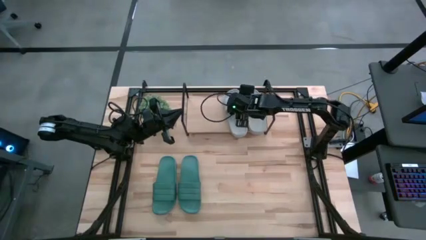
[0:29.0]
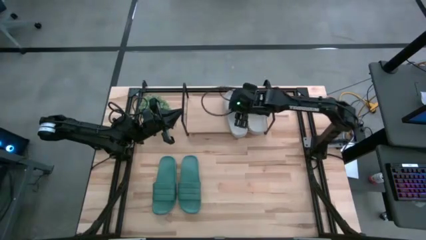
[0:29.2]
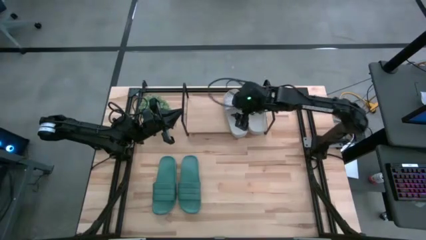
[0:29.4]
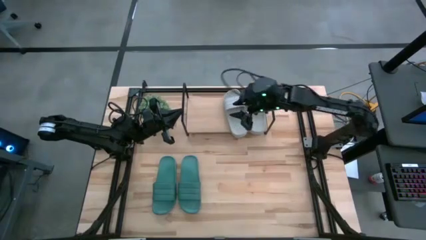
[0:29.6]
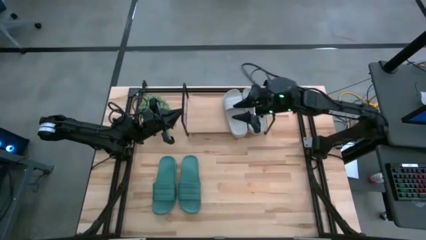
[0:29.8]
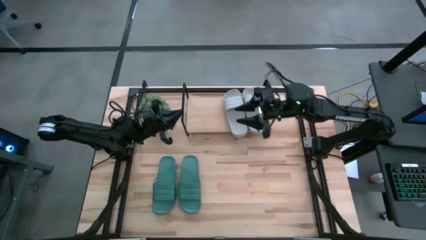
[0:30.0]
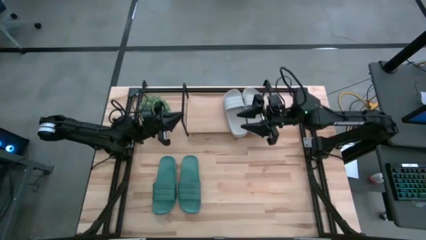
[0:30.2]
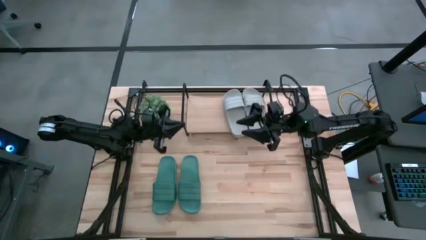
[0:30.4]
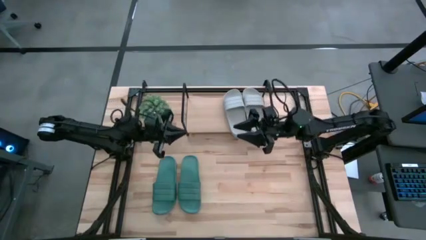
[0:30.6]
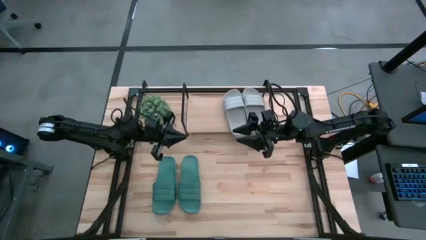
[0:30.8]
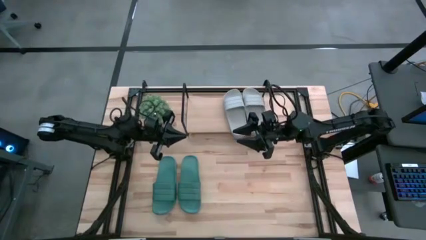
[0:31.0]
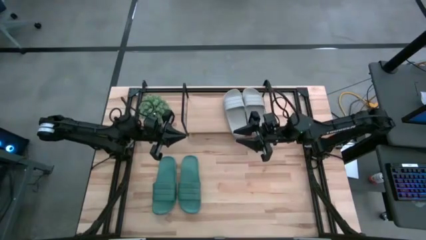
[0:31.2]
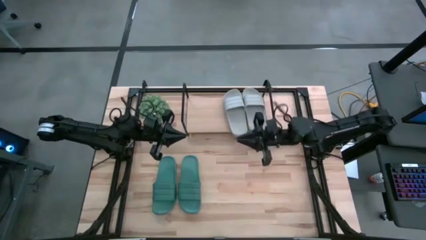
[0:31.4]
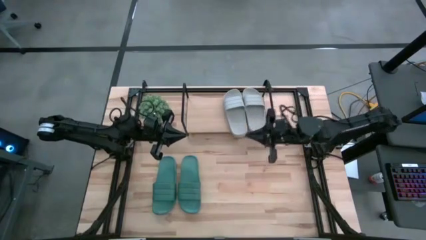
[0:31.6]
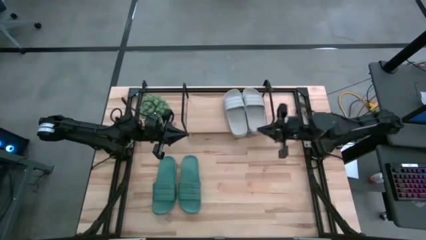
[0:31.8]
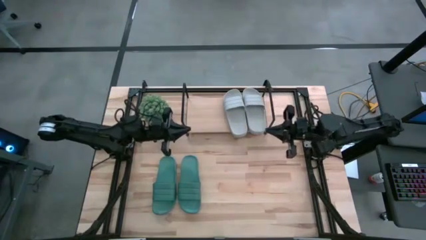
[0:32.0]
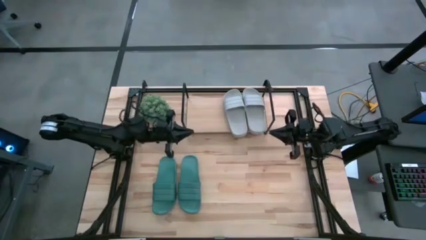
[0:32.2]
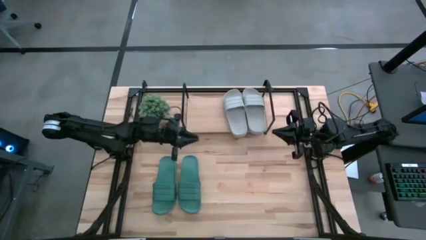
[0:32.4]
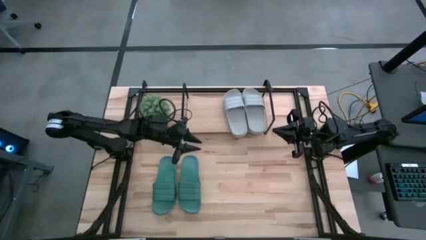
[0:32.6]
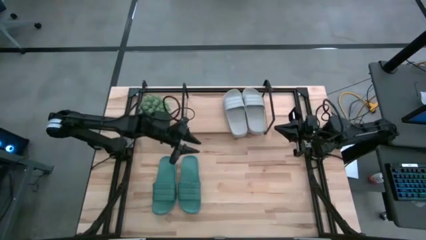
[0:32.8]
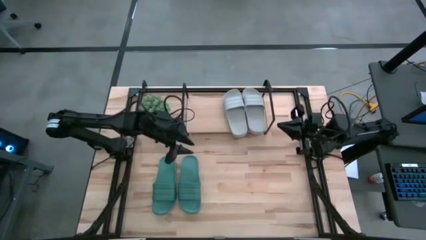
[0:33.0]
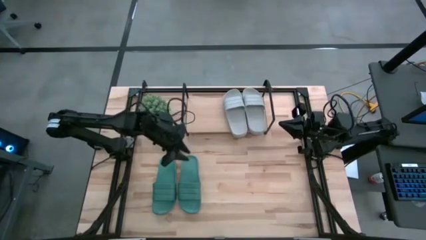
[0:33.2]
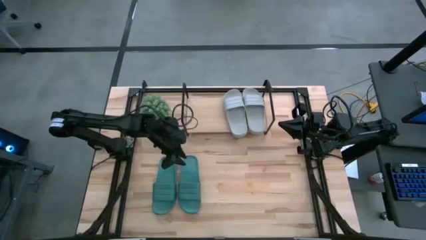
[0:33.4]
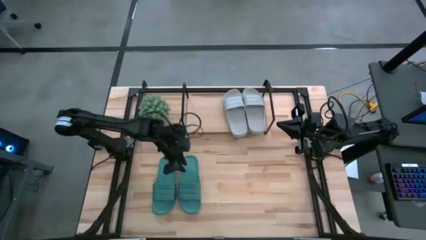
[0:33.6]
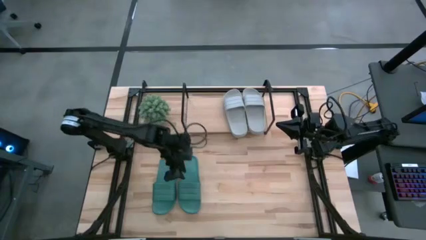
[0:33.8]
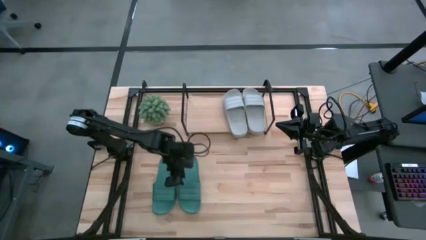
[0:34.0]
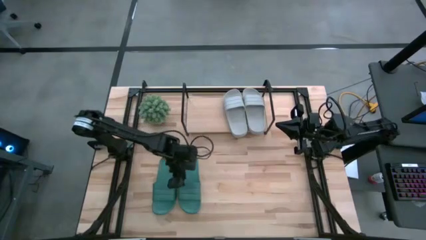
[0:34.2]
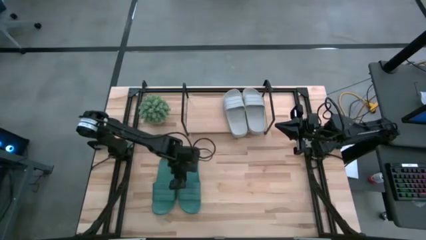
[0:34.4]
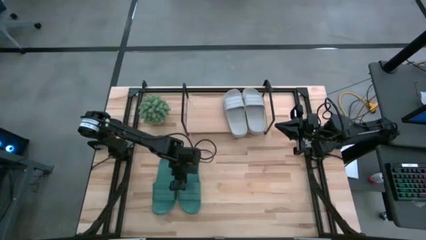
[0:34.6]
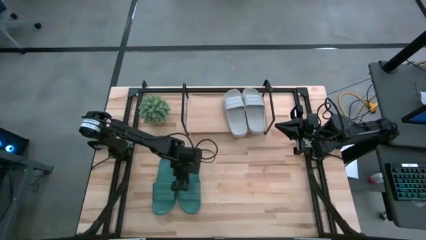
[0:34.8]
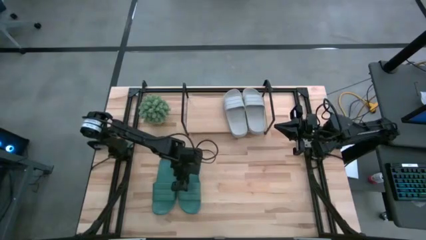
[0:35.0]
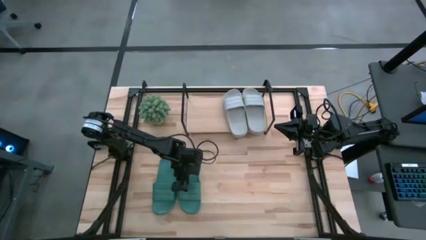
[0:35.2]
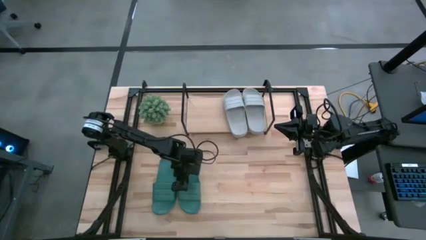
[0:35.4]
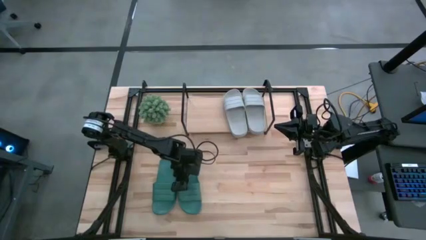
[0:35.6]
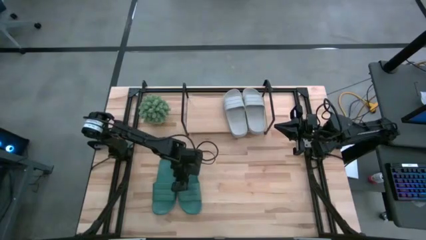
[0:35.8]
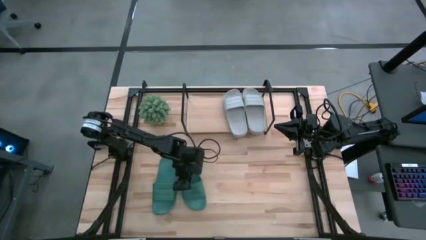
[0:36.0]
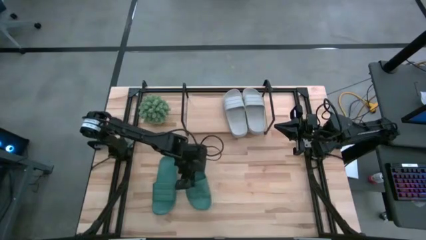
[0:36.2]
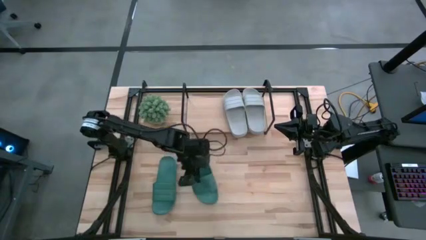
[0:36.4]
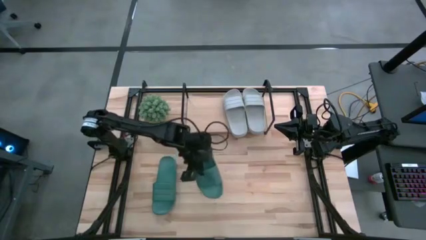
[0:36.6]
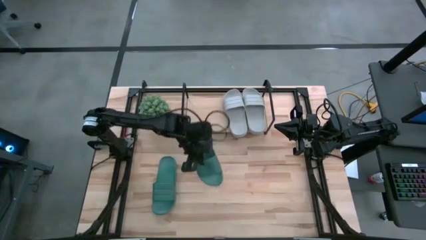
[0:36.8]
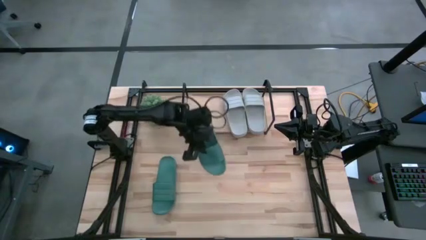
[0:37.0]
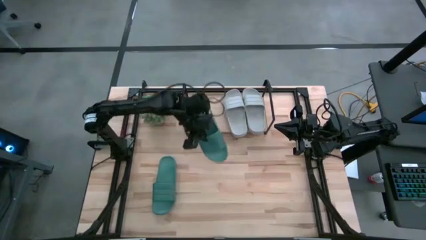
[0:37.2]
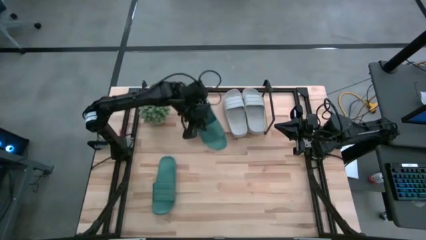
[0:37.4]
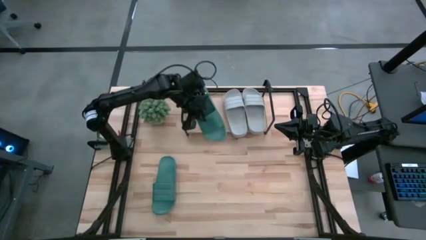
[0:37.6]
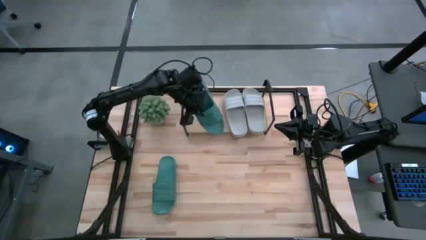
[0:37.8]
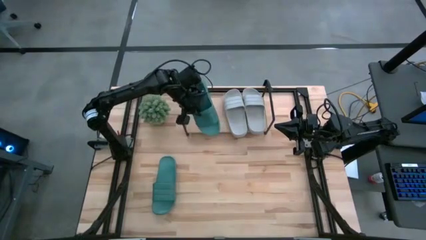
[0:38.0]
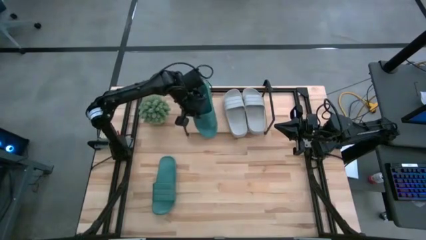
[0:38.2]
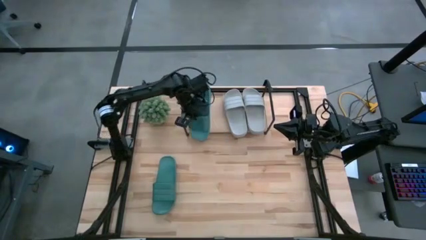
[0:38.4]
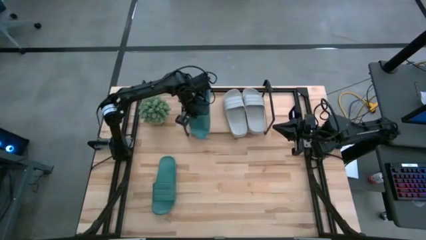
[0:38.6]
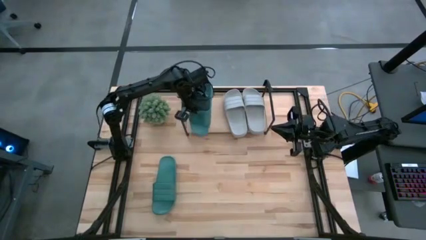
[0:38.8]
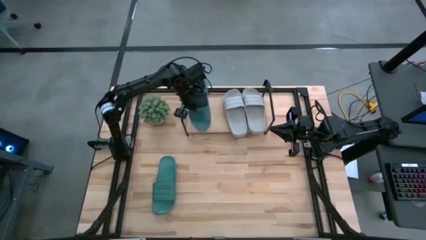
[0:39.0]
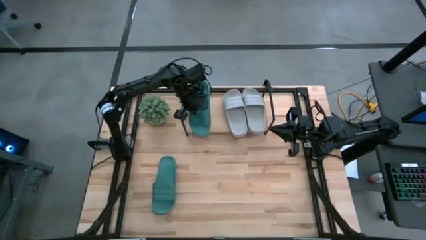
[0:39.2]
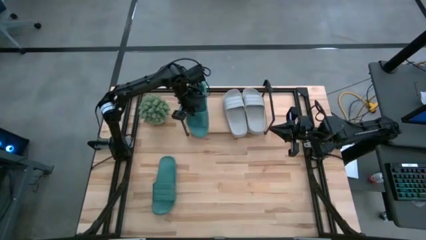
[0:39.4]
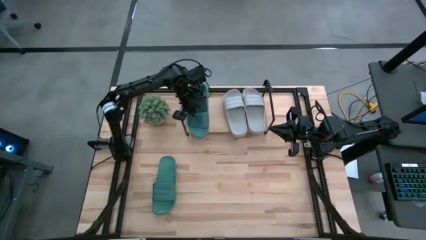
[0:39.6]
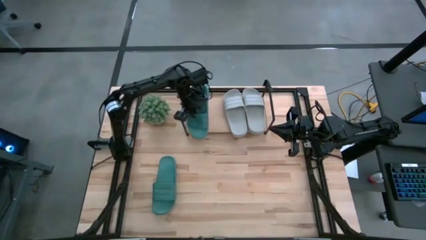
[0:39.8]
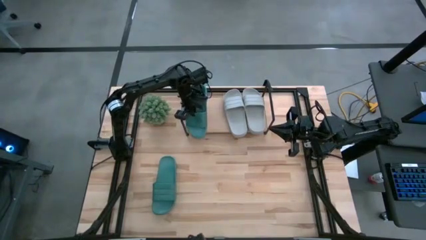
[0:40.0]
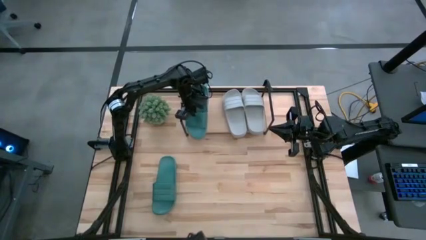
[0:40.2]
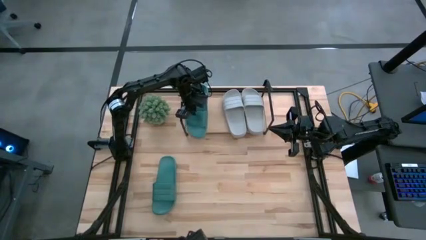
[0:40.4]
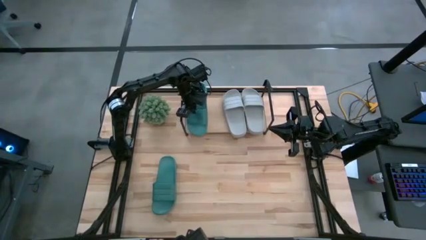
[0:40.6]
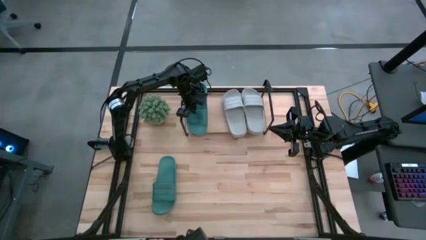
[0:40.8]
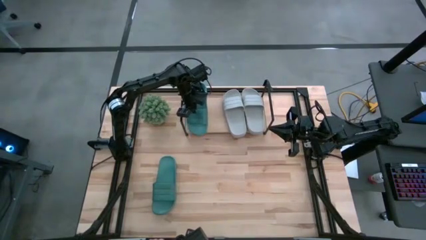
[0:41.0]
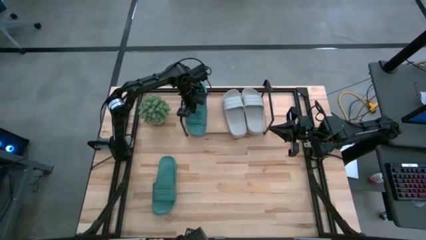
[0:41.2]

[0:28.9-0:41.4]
Task: Pick and place slides into the shelf
Put the right green slide on the shelf

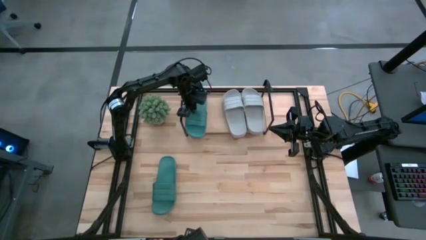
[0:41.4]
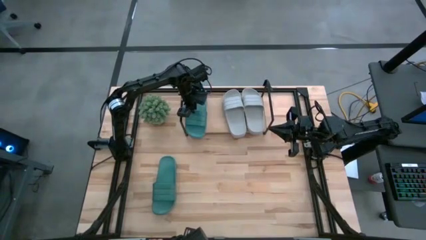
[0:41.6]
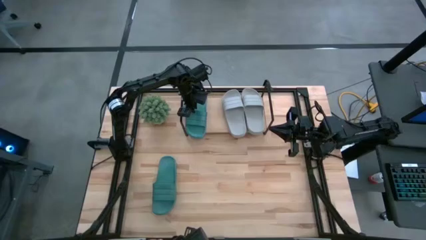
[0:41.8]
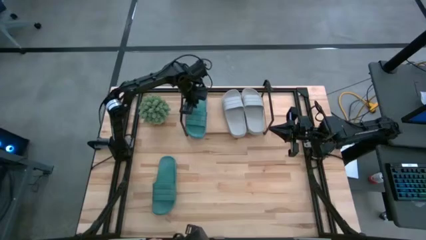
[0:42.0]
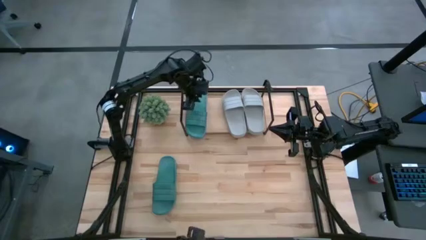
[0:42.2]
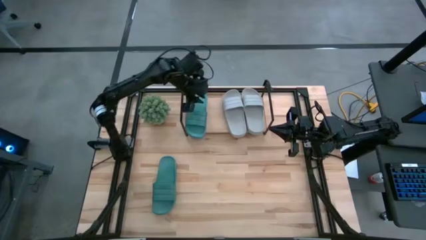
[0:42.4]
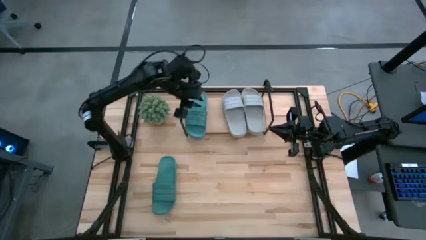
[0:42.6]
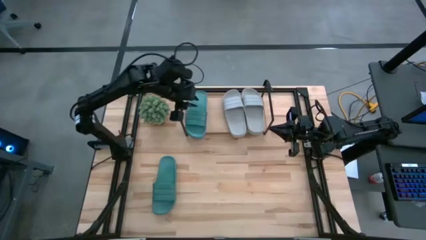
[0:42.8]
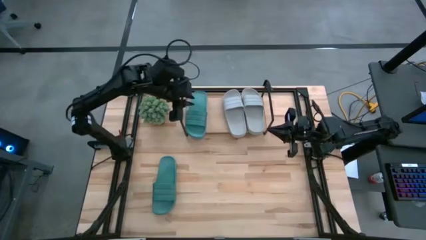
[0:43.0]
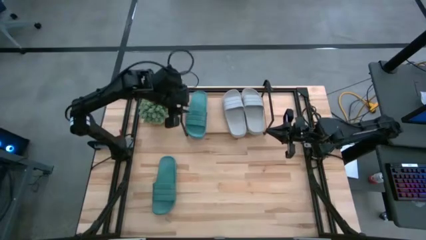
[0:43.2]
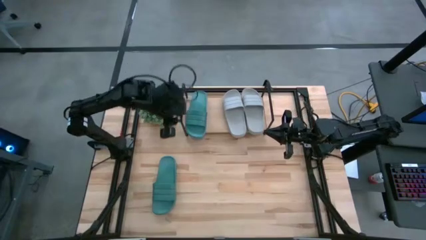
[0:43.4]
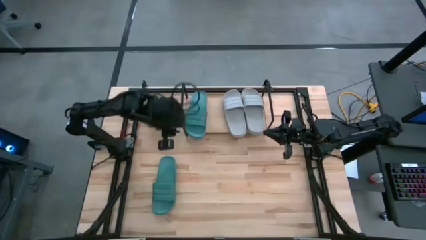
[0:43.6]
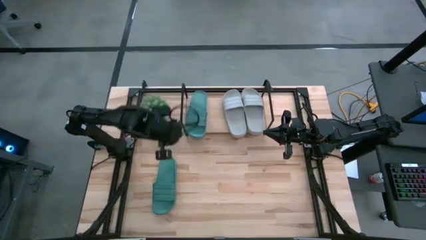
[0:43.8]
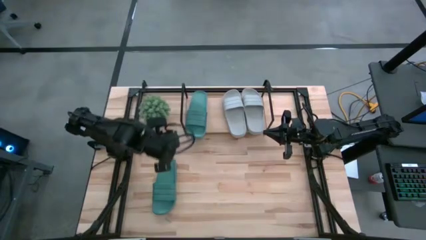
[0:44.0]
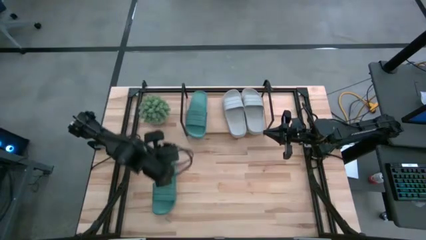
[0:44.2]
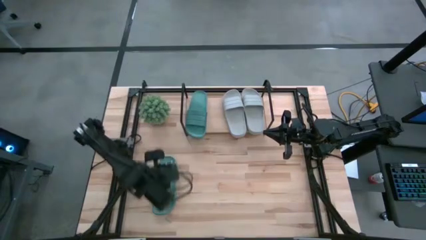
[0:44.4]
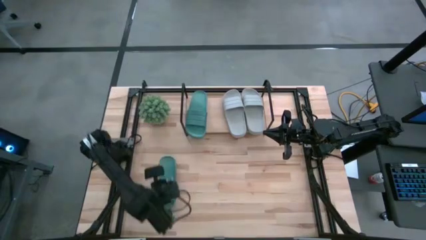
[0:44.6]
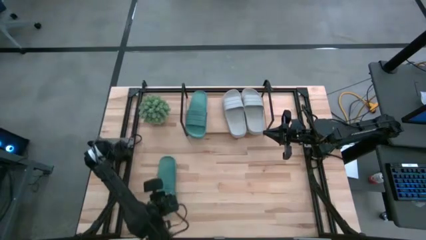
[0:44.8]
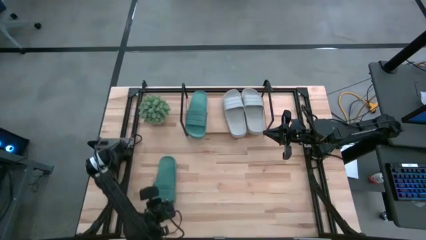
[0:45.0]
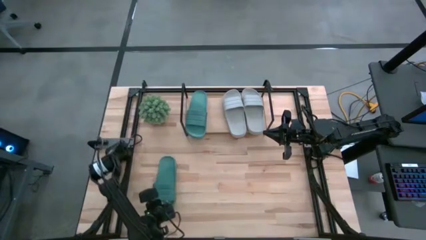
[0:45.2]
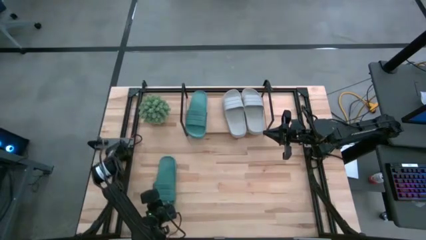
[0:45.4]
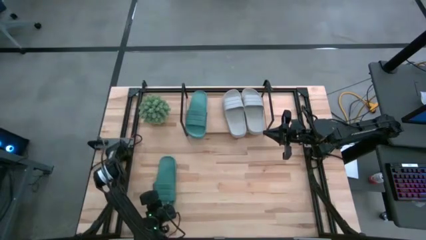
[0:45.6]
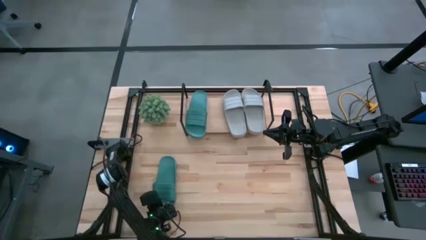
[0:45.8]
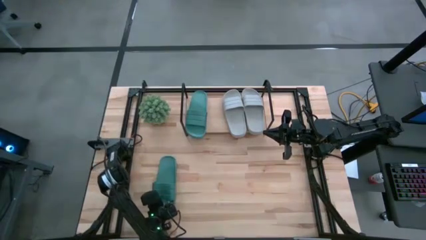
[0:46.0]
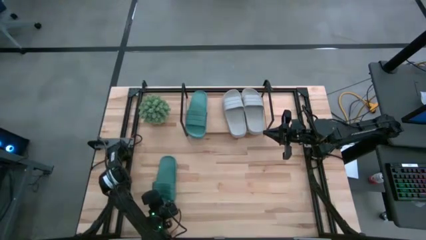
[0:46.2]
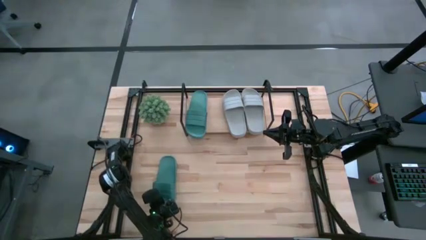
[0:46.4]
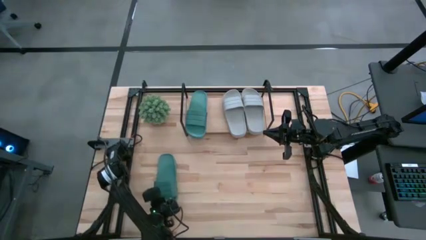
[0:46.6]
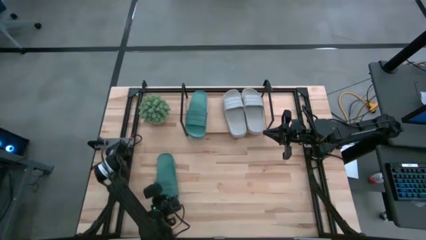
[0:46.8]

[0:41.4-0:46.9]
Put the green slide on the shelf
